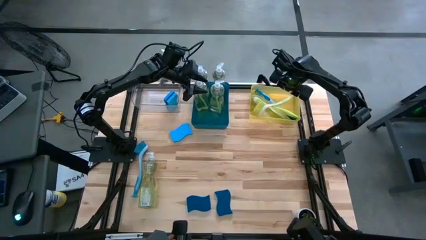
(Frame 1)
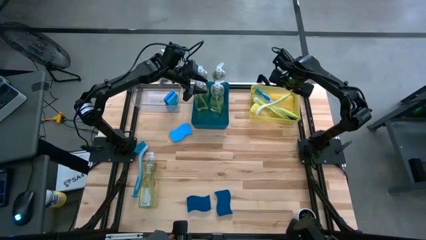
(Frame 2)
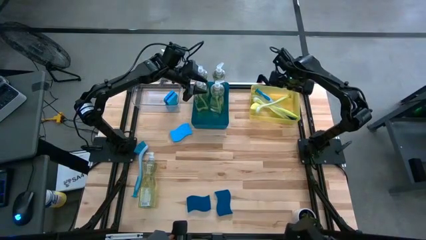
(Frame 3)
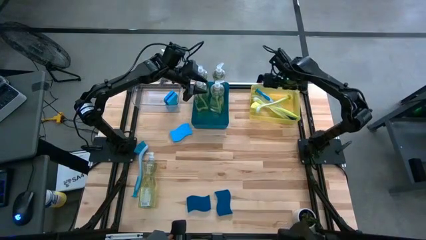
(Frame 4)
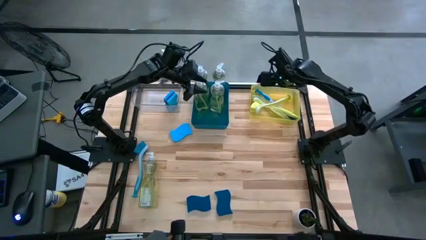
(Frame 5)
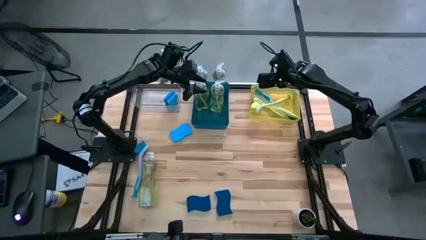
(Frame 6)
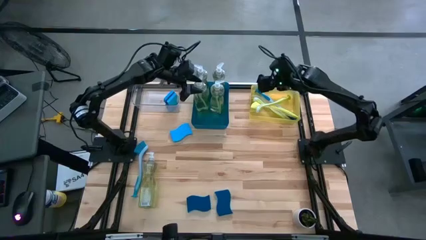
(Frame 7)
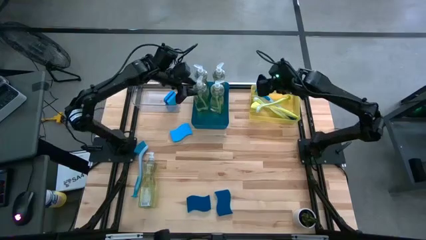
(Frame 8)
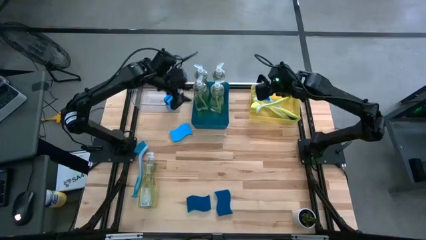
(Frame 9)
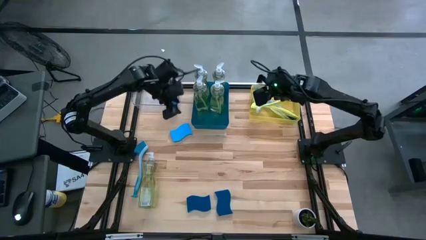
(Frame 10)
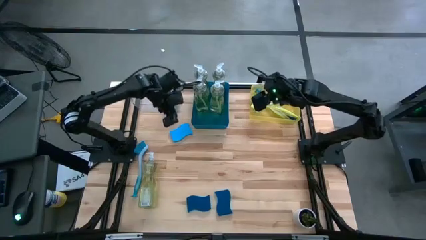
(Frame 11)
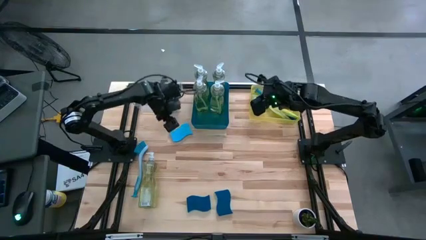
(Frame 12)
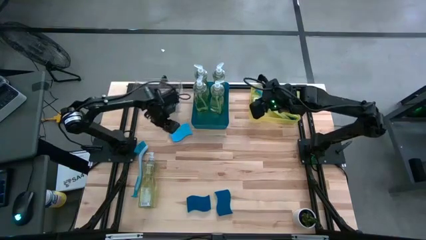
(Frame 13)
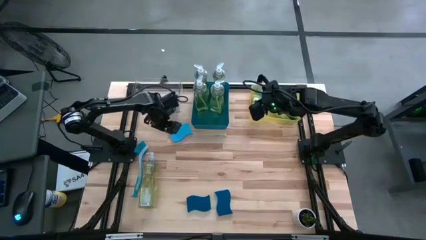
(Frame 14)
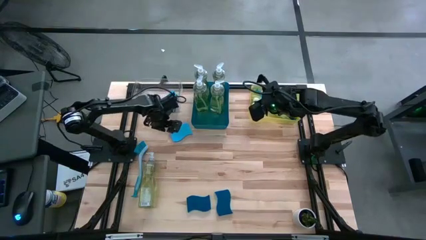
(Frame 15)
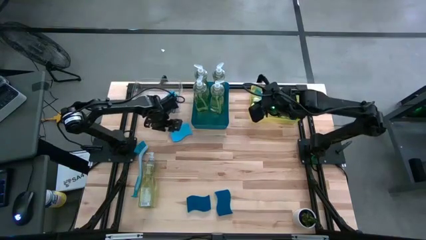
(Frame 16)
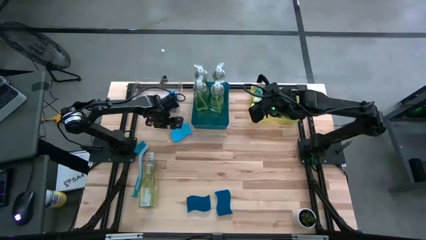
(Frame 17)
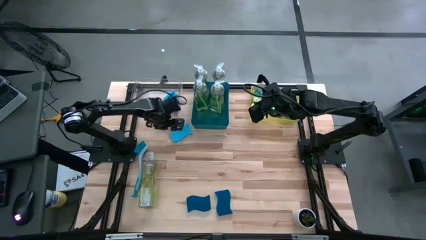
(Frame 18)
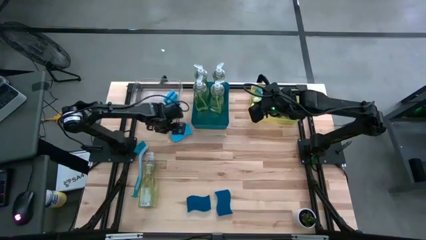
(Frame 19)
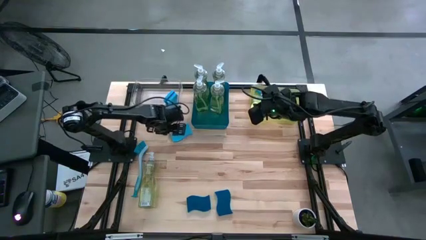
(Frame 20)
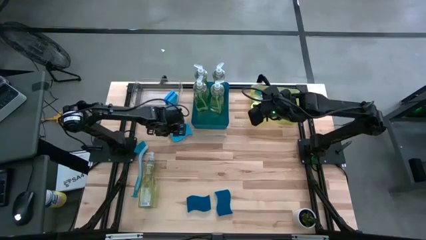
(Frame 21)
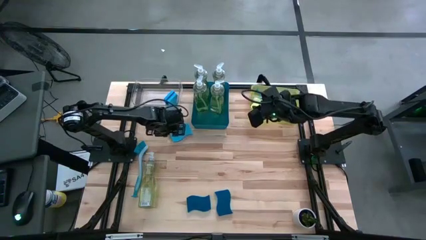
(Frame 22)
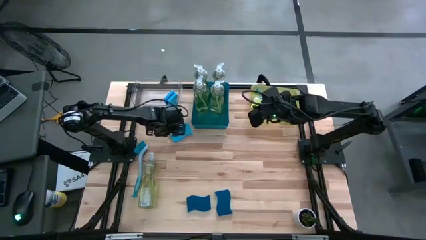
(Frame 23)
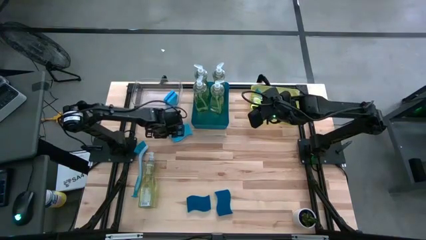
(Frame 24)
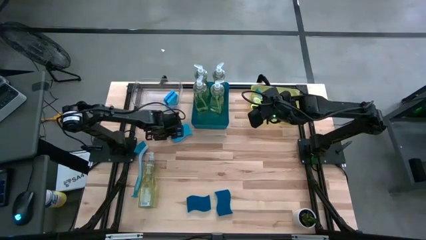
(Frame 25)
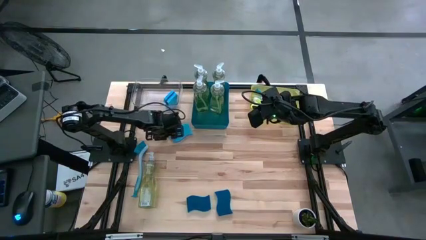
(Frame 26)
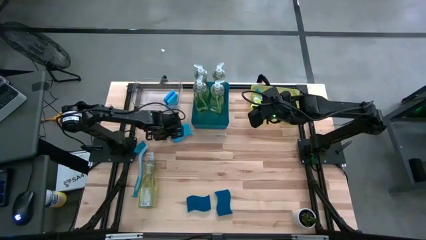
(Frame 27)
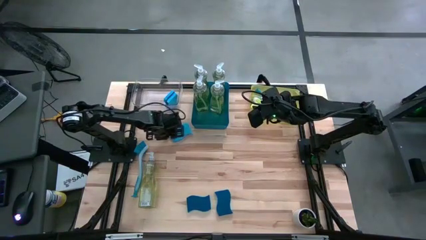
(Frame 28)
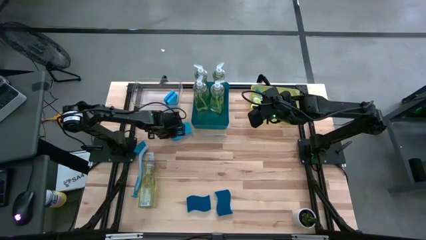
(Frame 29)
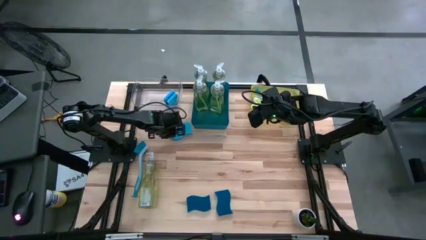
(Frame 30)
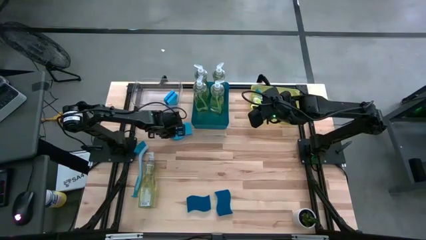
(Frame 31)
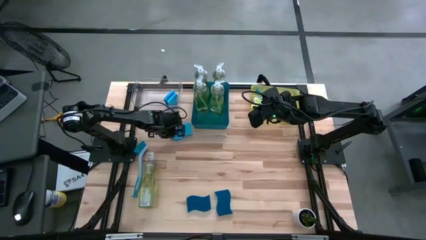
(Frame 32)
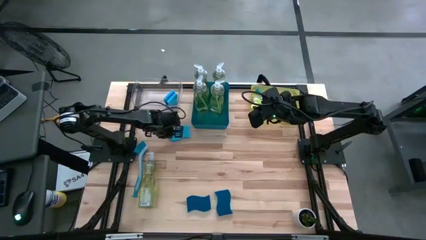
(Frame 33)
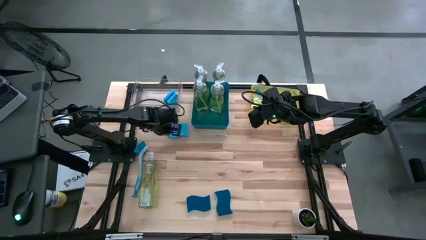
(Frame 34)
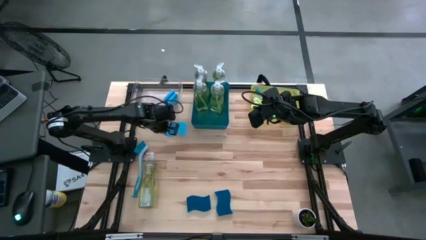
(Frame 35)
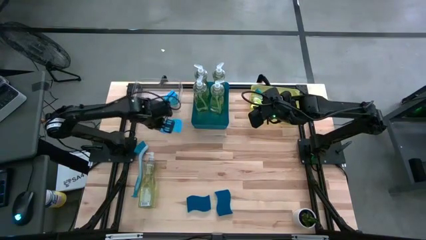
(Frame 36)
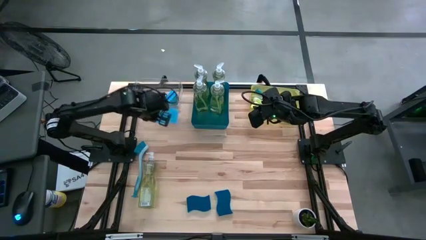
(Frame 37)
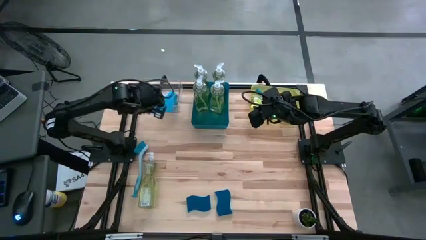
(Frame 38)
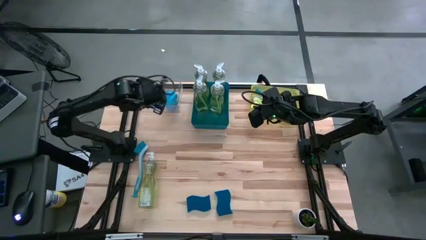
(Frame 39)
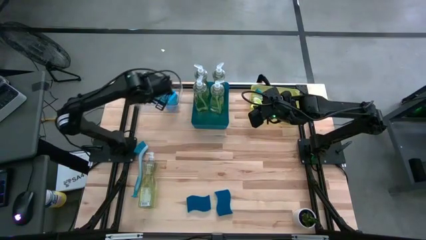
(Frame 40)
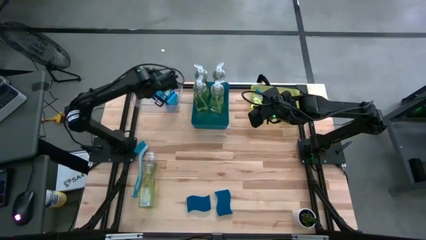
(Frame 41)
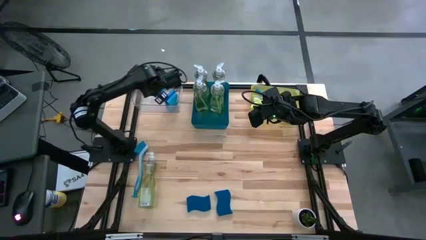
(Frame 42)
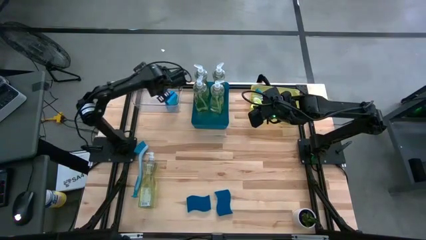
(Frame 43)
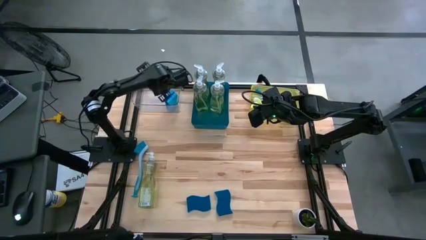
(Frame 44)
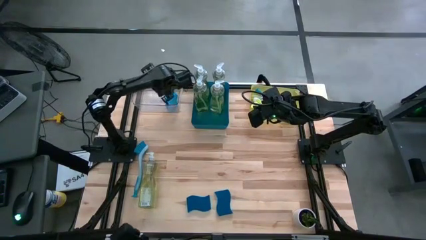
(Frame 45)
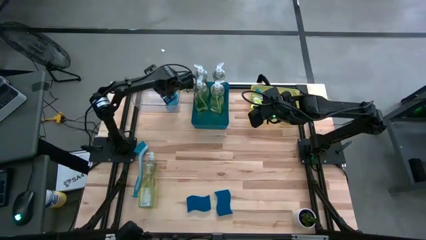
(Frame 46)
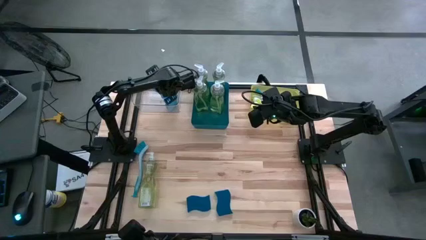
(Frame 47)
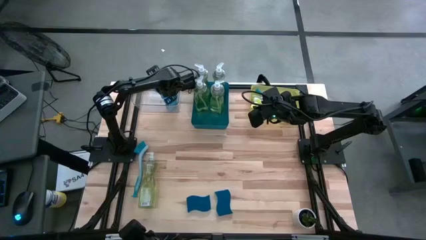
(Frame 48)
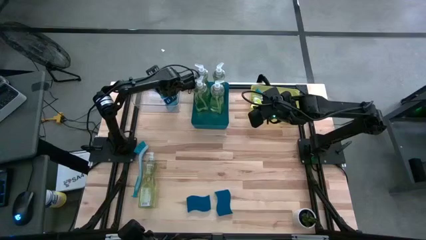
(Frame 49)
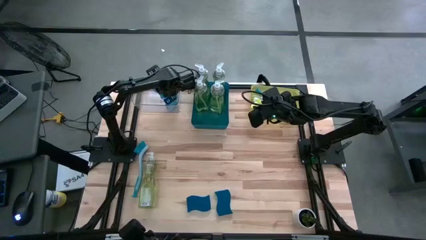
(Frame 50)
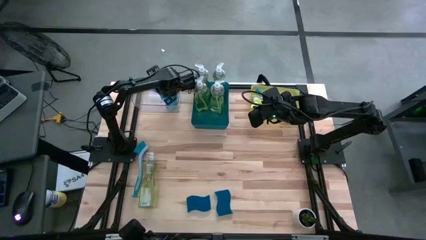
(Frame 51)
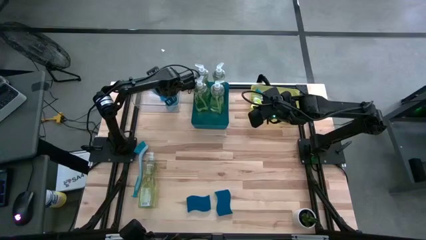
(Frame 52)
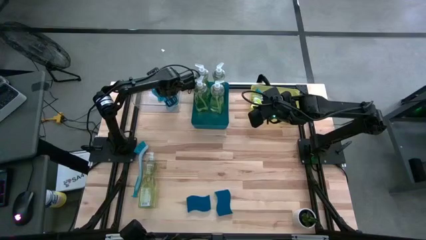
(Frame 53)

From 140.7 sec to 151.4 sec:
Task: Pick & Place Kitchen Sink Supplies
Put the blue sponge into the transparent bin

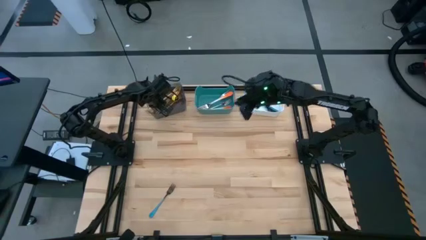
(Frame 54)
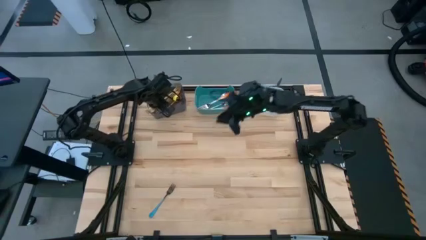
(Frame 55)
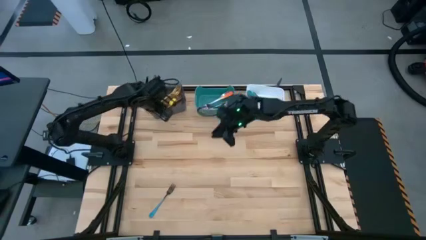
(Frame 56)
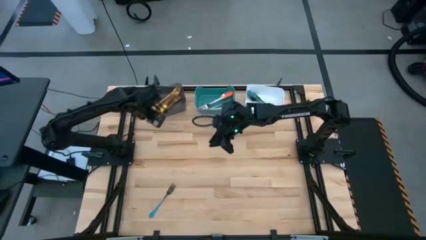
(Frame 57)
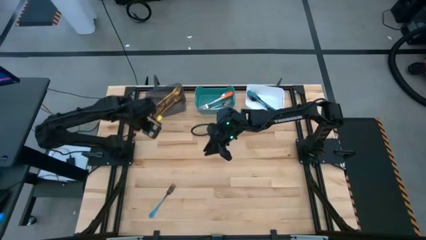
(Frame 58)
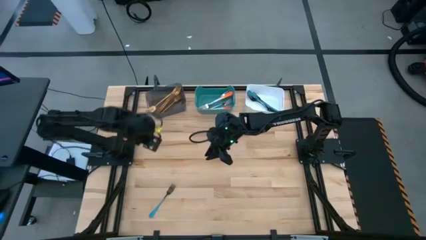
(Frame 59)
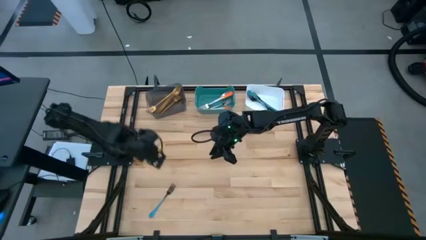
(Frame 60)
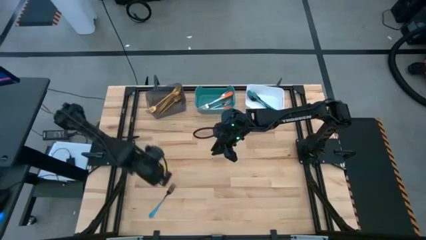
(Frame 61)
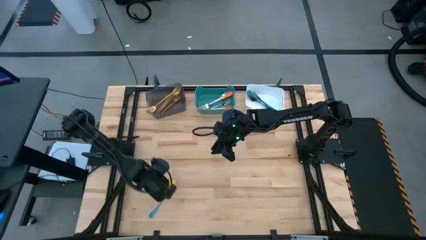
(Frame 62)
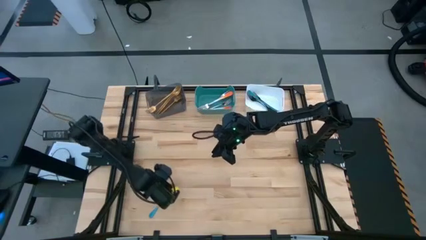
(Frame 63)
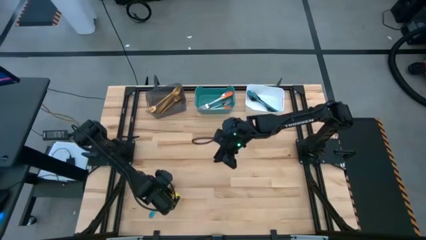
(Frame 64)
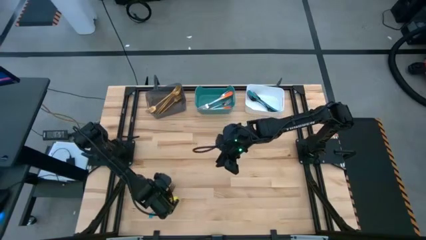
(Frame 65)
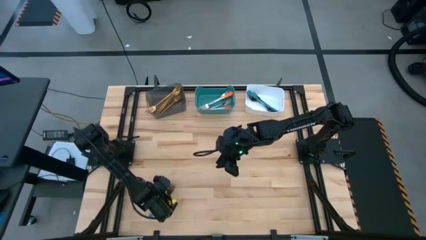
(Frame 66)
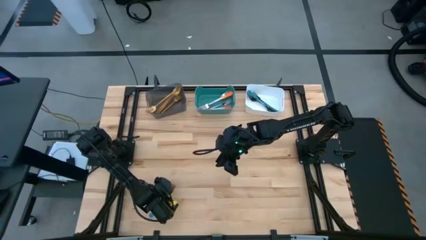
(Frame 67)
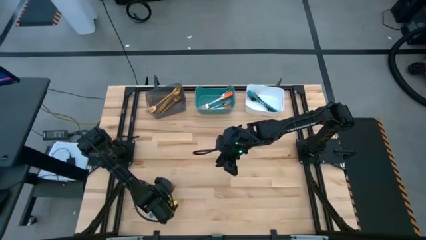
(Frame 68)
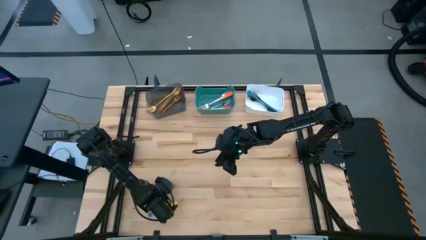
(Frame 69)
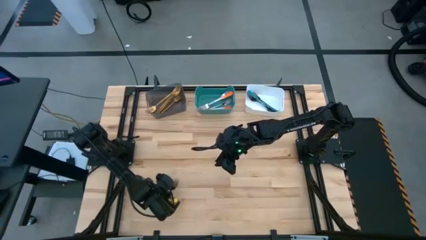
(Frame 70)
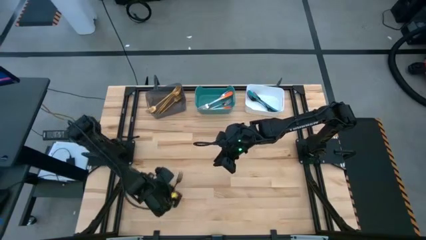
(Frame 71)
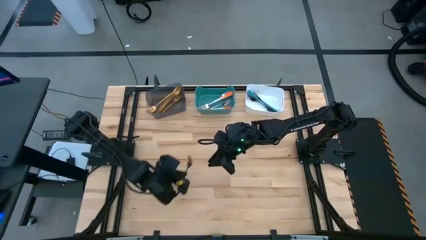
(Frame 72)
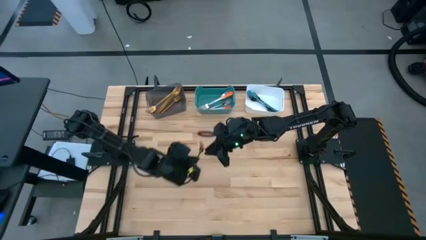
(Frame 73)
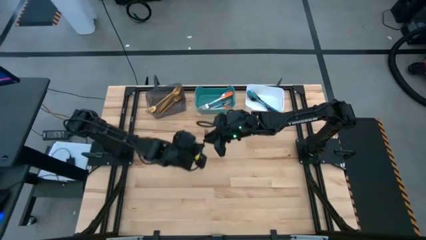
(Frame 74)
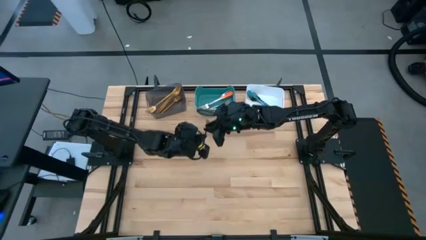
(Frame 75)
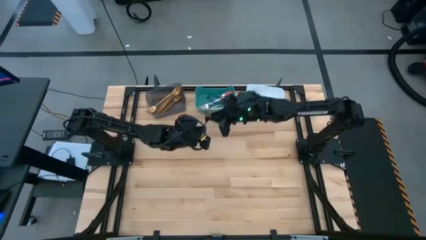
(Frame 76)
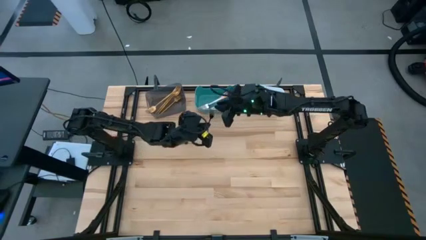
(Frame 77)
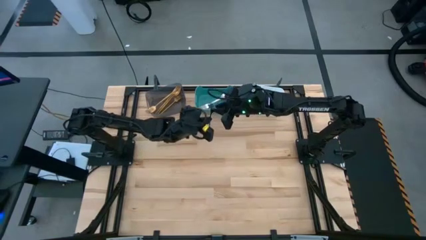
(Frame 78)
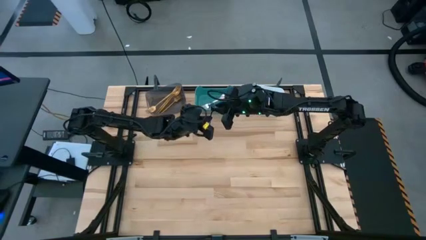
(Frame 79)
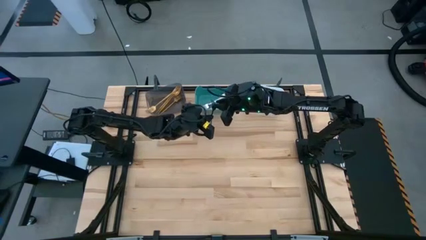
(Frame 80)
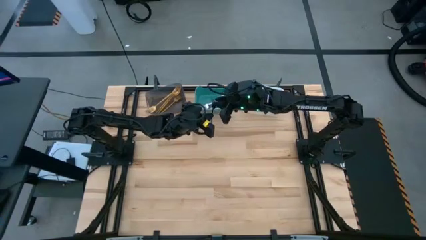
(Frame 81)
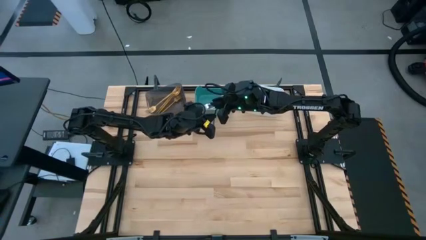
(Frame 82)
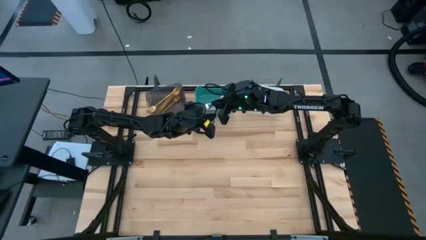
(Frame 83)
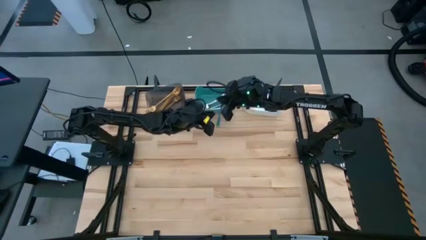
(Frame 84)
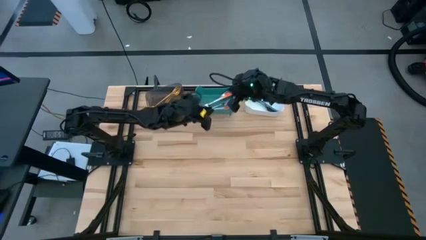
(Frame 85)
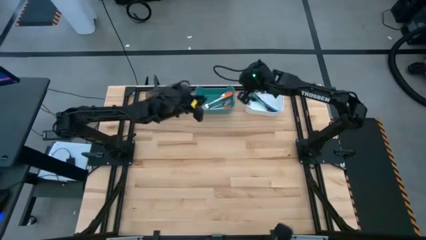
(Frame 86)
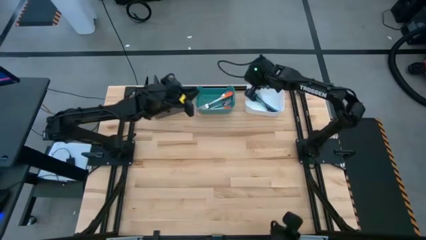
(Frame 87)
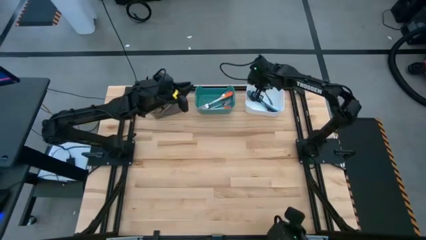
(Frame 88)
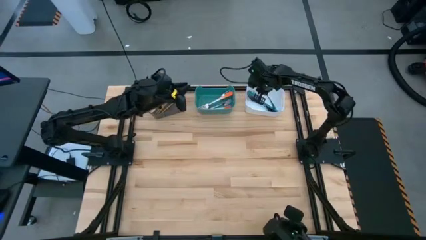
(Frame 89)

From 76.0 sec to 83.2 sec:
Task: Sort silverware by color (type)
Put the blue fork into the white bin
